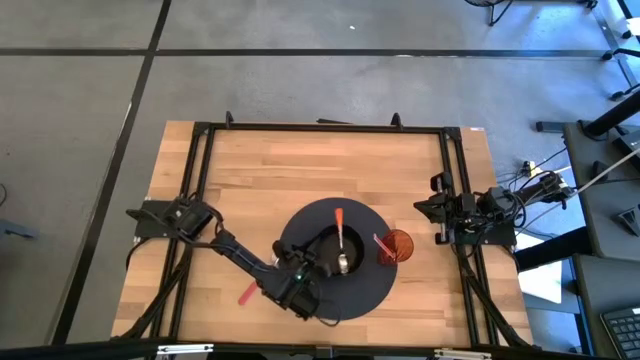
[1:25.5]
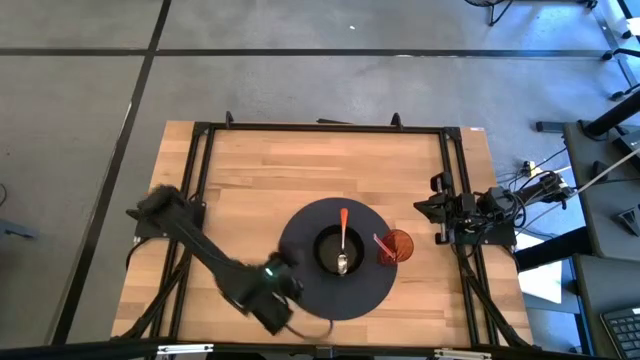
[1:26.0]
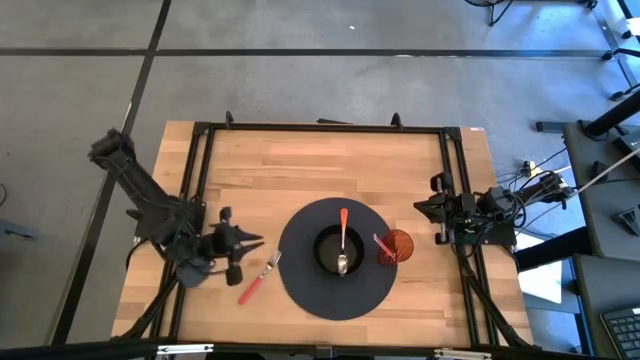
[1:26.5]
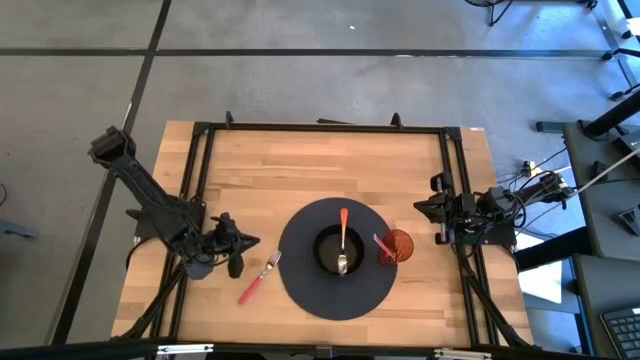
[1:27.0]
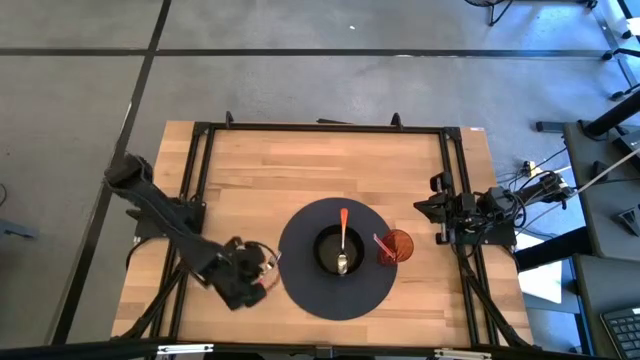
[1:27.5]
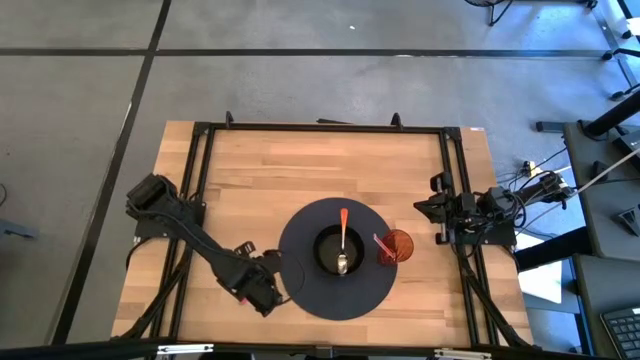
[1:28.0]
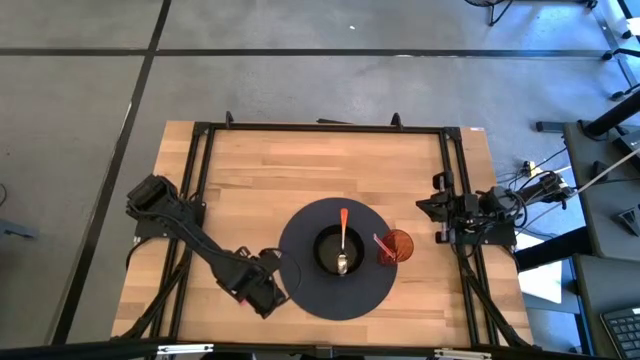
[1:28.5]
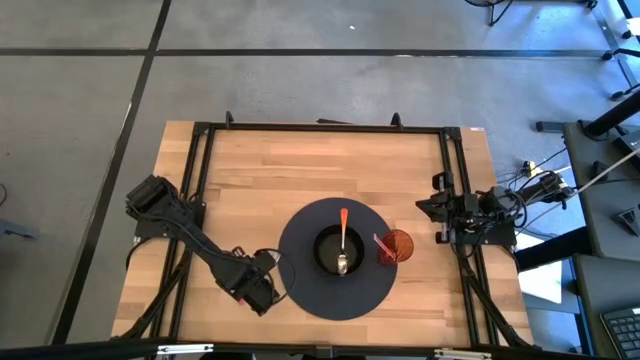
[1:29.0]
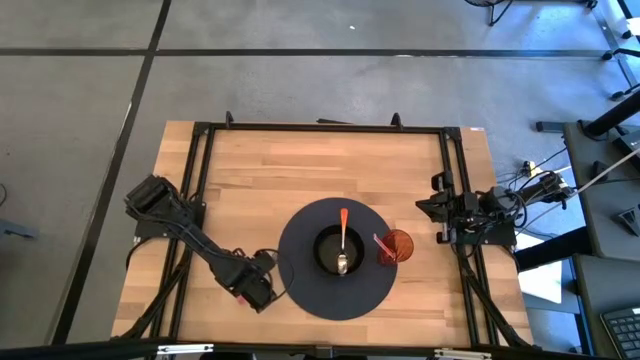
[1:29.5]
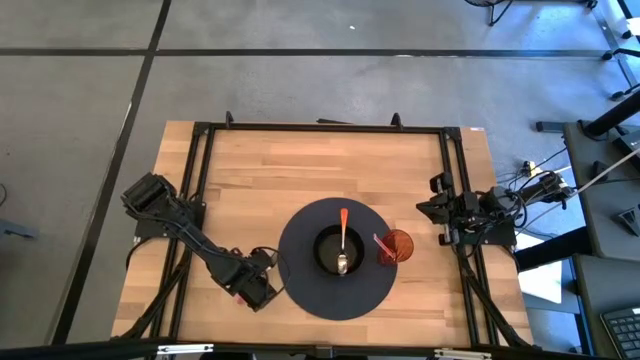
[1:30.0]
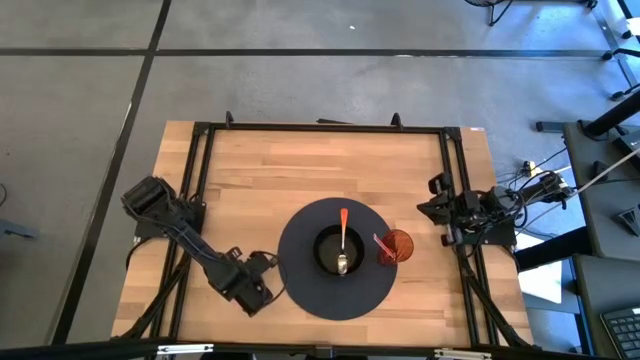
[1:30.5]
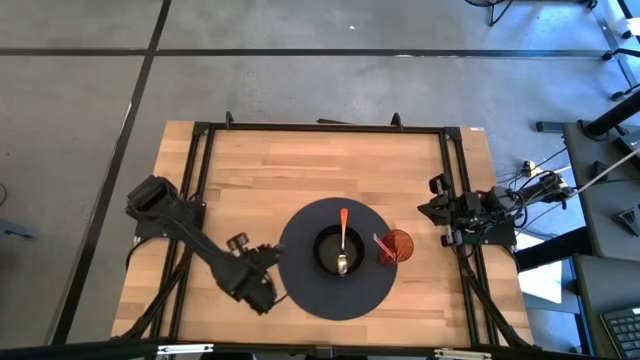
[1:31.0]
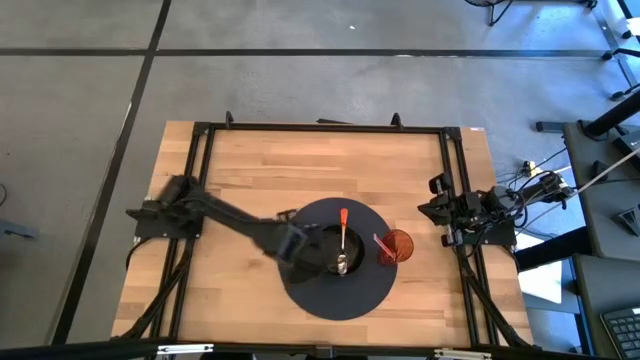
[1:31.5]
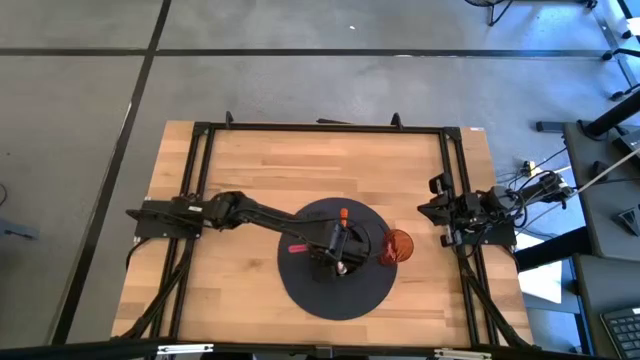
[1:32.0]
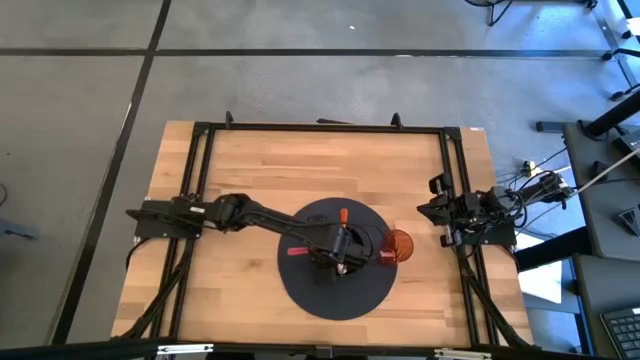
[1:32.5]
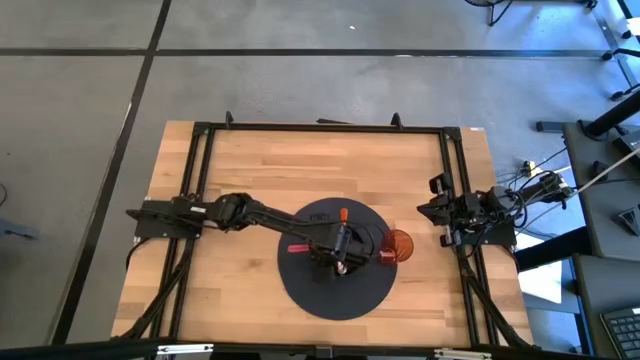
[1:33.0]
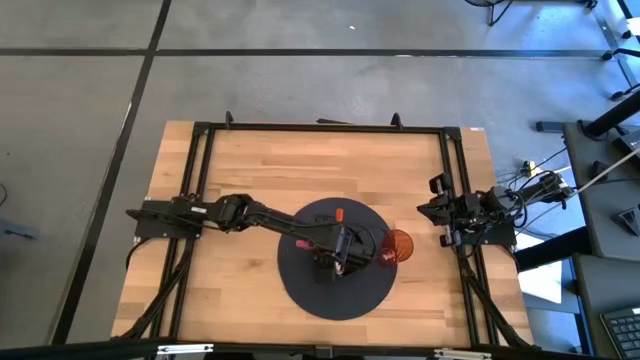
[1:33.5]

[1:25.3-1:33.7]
Task: Pick & Place Utensil
Put the pink fork into the black bowl on the mat

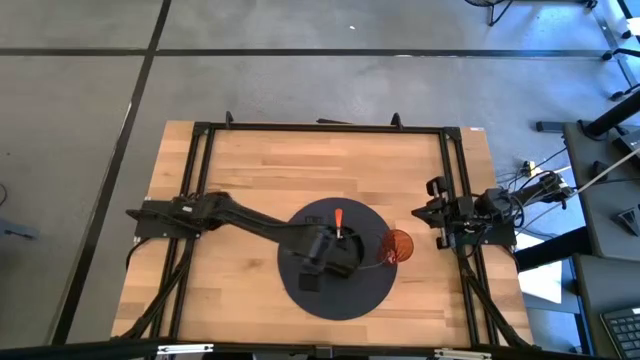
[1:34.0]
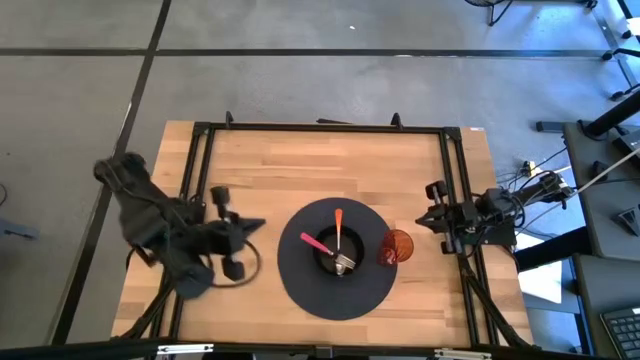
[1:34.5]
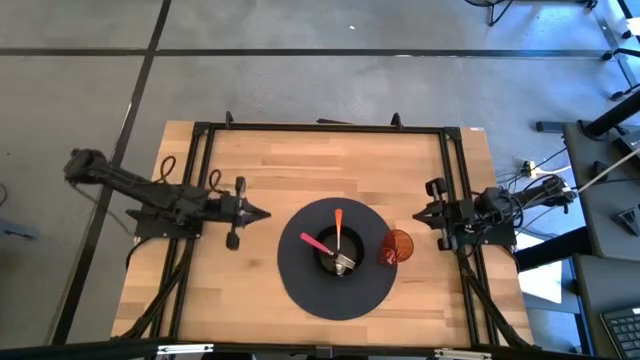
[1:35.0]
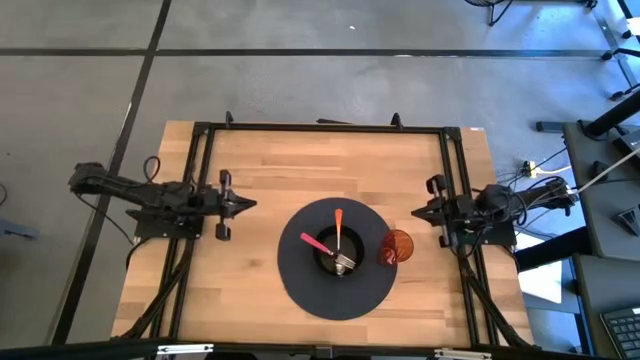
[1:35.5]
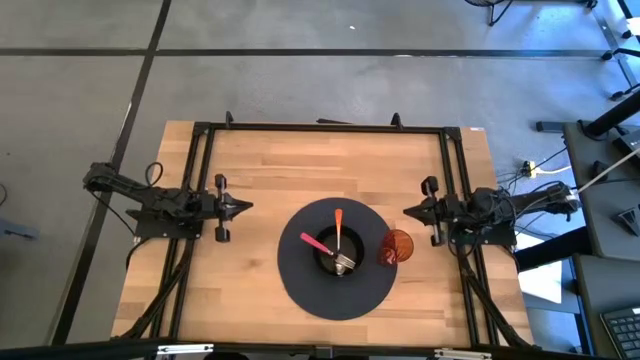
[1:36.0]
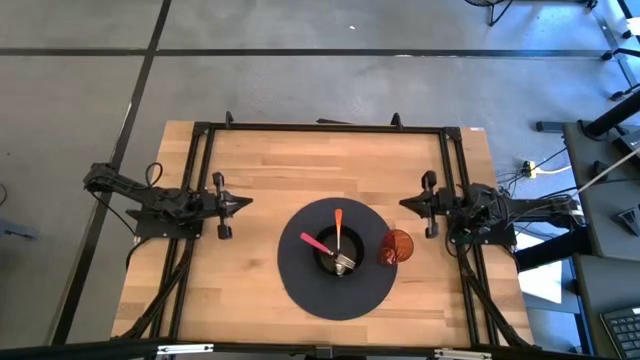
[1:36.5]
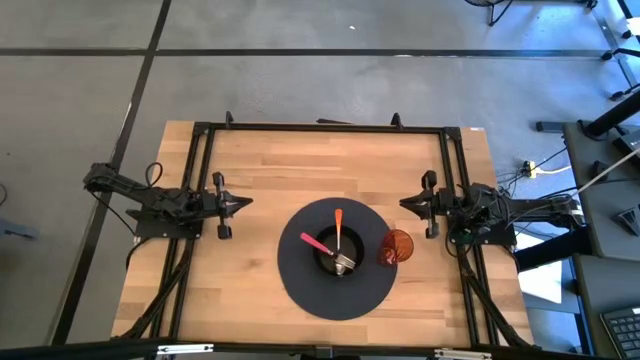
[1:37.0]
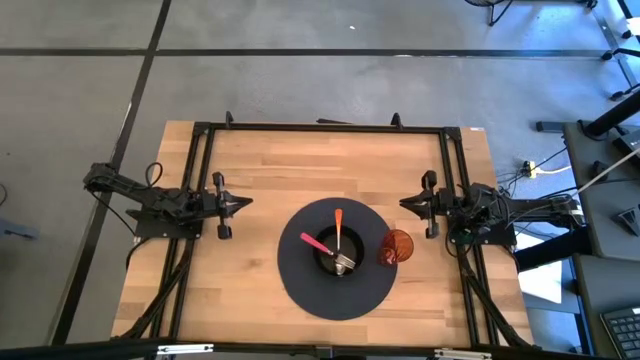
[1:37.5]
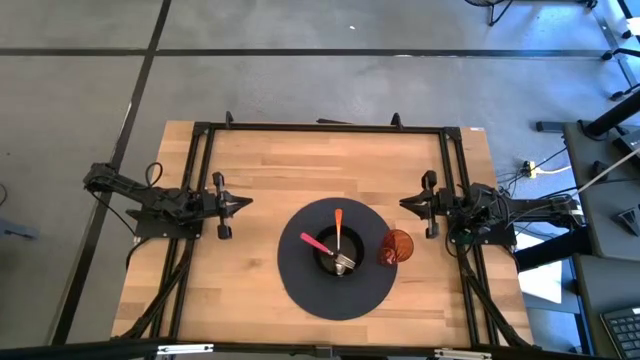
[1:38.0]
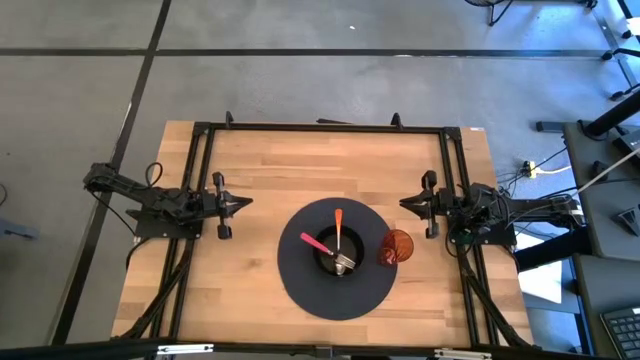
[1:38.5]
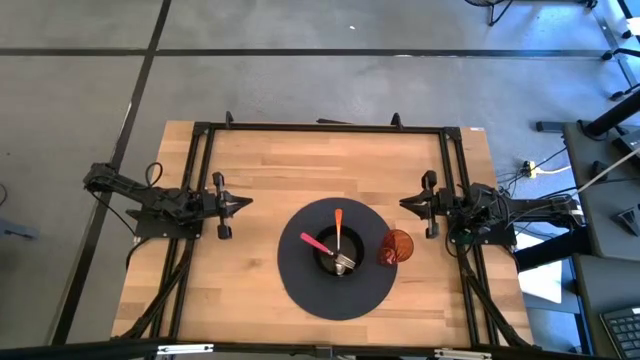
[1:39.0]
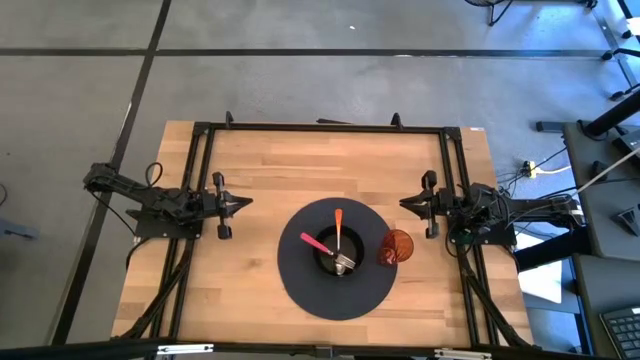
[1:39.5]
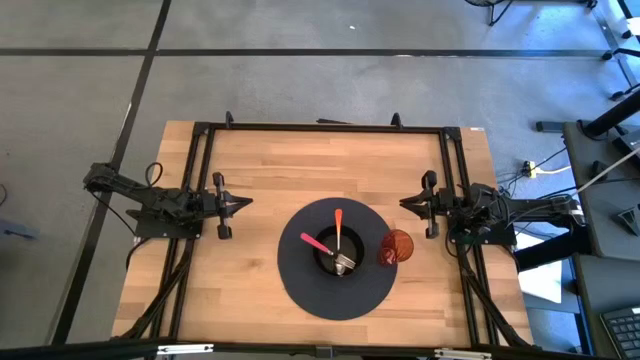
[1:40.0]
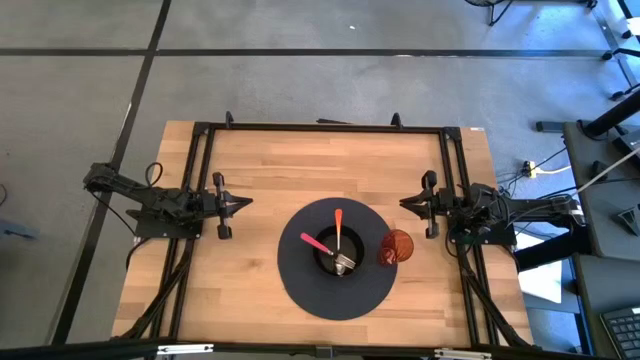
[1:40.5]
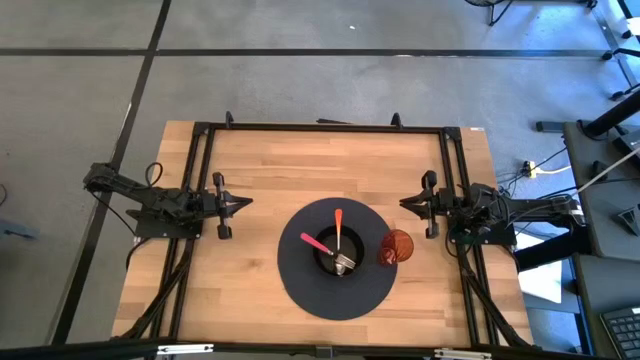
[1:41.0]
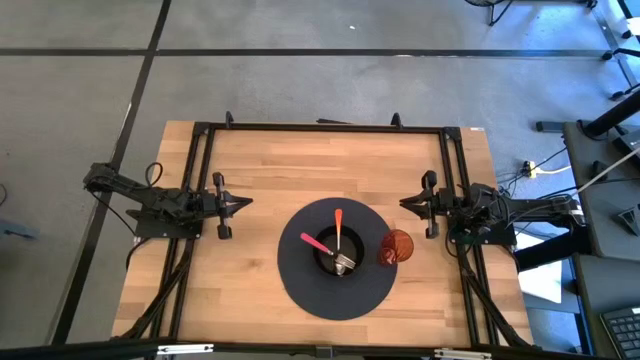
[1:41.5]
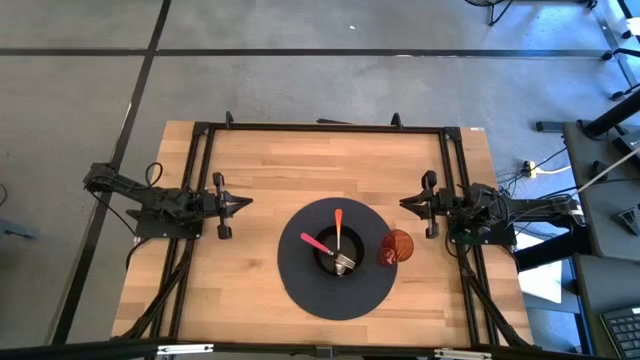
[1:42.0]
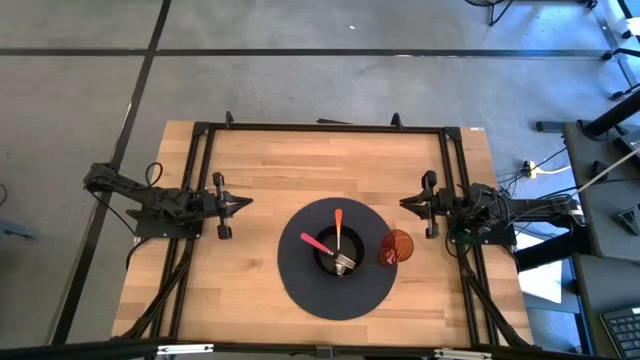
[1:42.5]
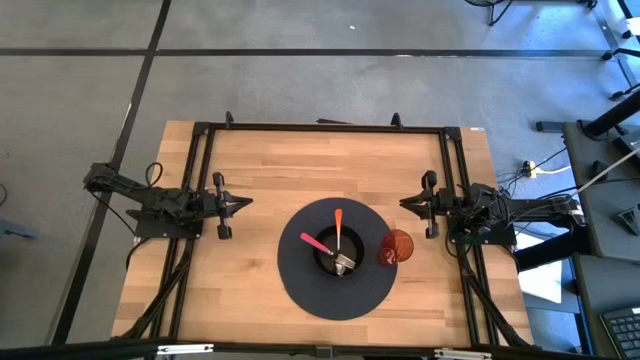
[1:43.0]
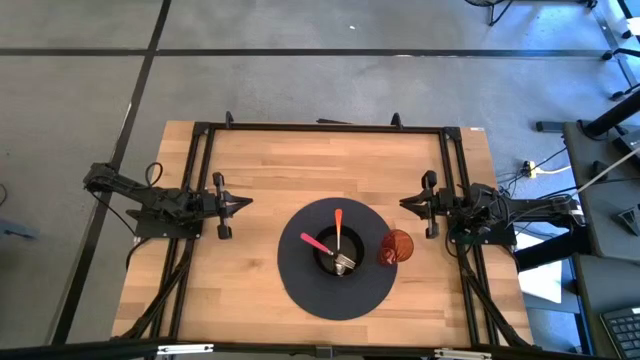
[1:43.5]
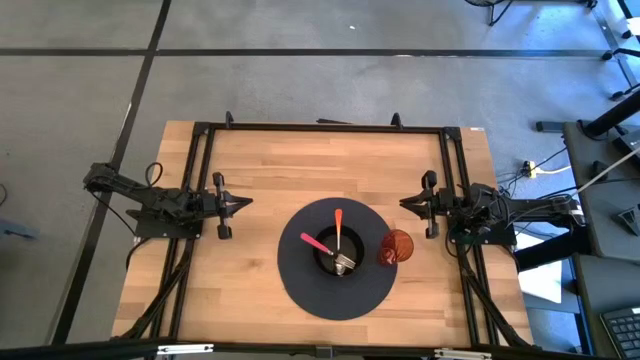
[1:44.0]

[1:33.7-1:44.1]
Return to Home Position
